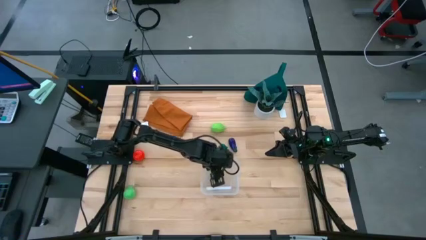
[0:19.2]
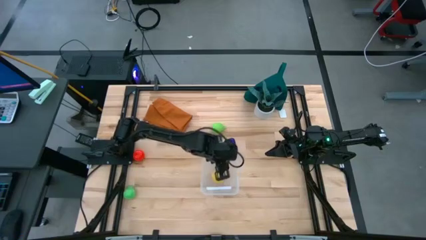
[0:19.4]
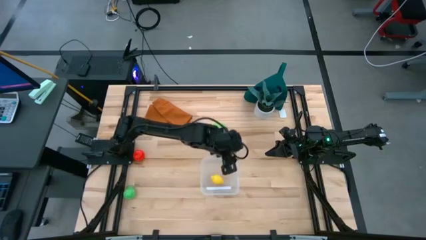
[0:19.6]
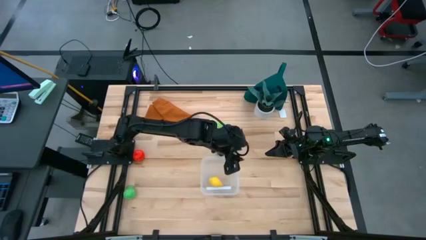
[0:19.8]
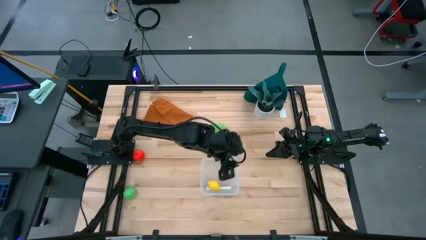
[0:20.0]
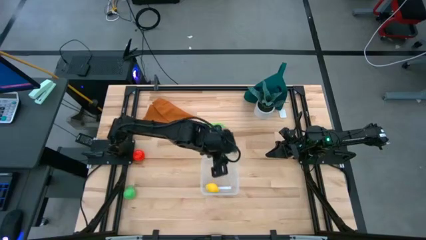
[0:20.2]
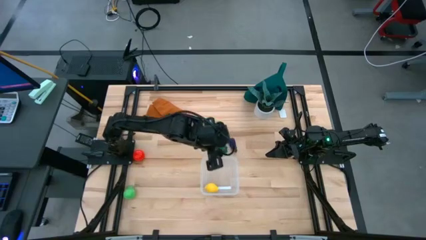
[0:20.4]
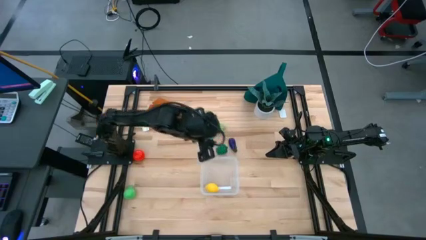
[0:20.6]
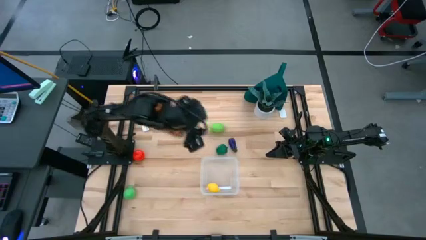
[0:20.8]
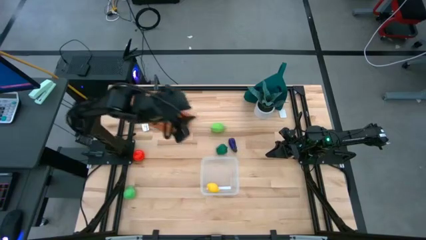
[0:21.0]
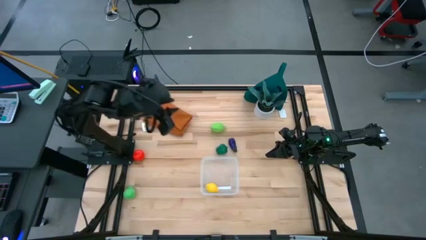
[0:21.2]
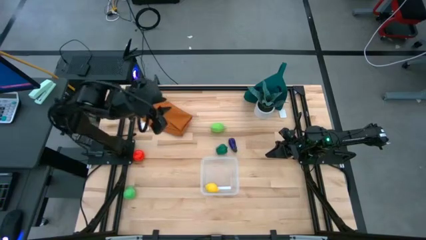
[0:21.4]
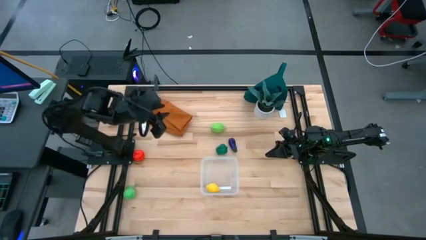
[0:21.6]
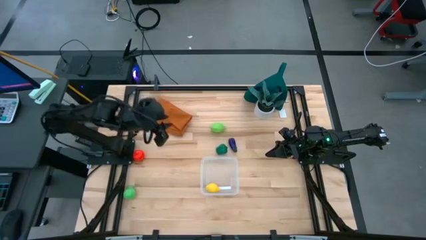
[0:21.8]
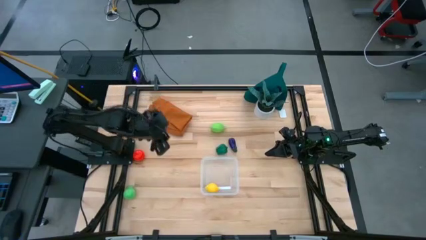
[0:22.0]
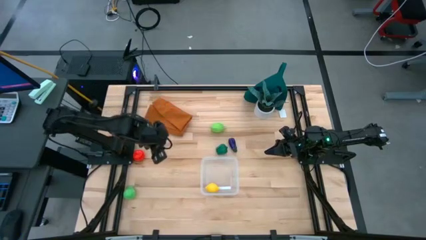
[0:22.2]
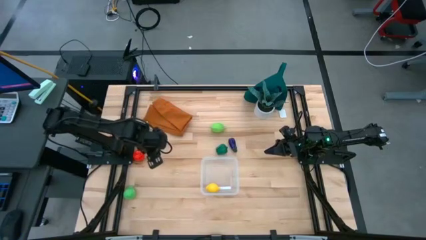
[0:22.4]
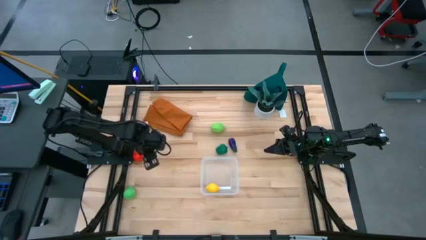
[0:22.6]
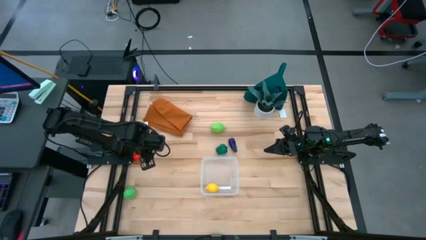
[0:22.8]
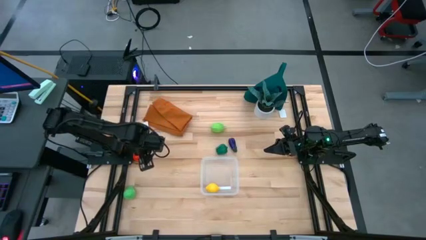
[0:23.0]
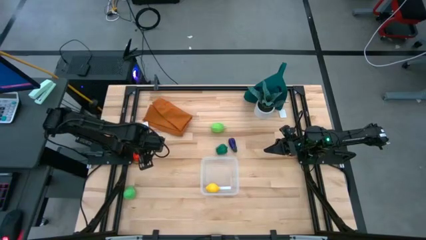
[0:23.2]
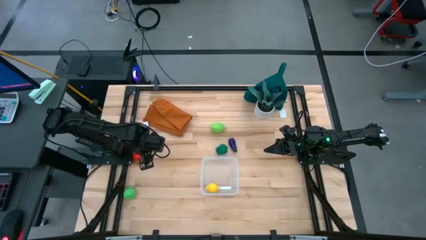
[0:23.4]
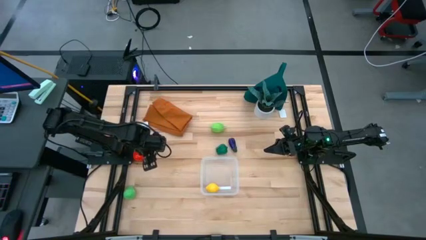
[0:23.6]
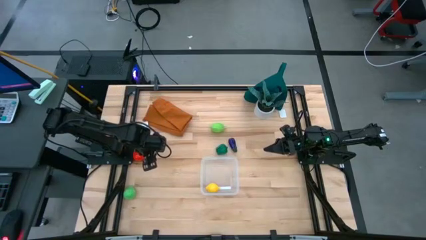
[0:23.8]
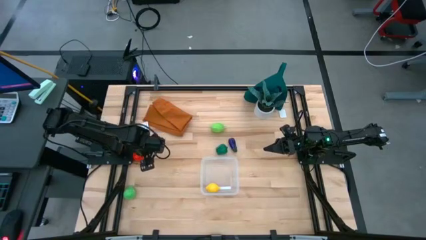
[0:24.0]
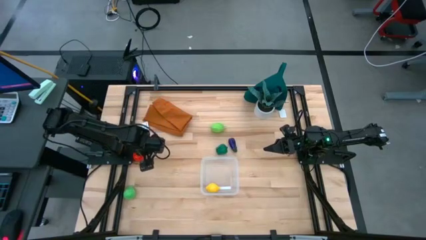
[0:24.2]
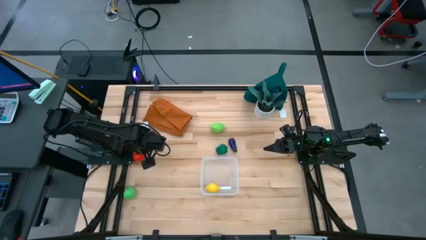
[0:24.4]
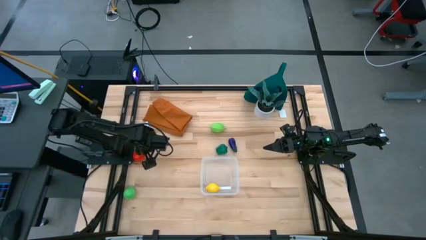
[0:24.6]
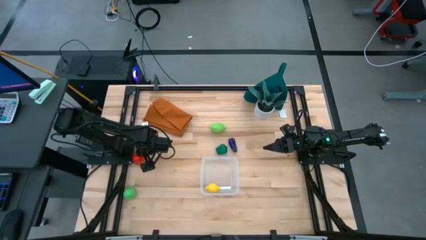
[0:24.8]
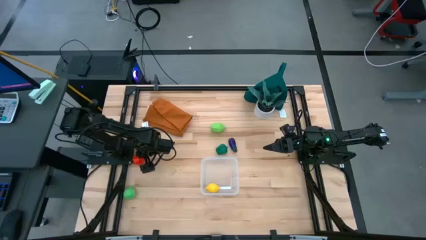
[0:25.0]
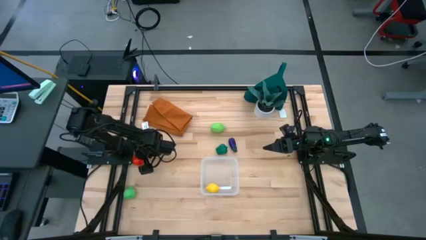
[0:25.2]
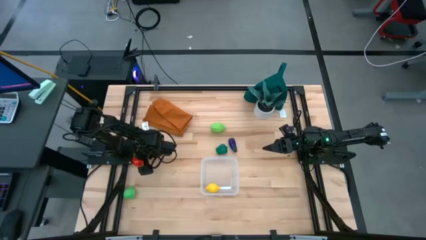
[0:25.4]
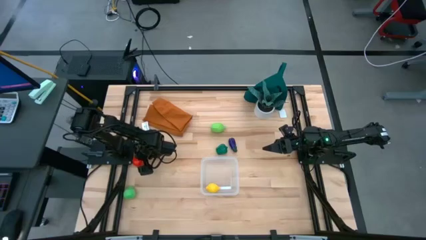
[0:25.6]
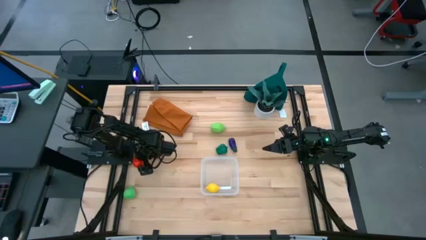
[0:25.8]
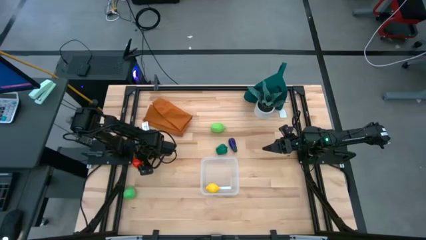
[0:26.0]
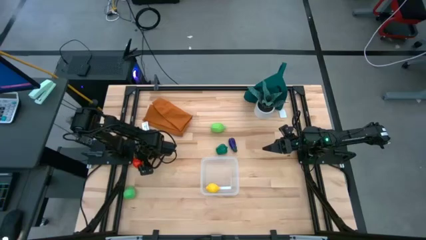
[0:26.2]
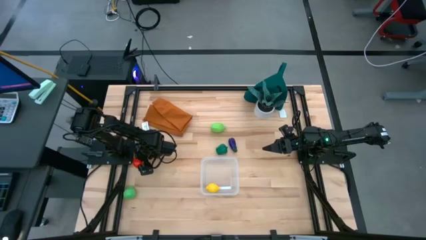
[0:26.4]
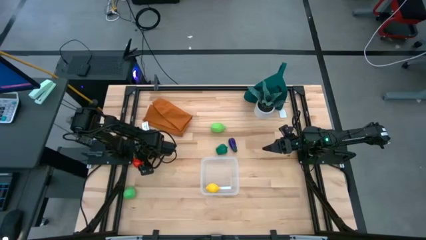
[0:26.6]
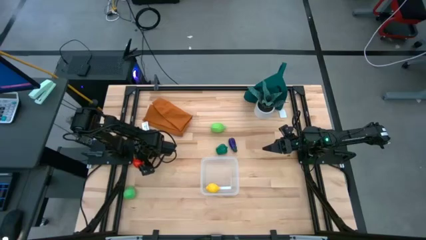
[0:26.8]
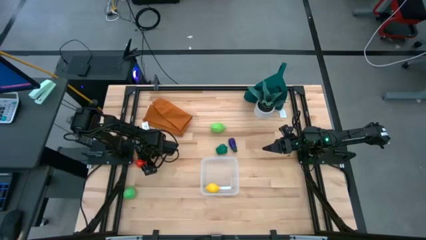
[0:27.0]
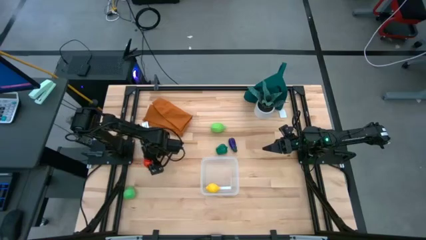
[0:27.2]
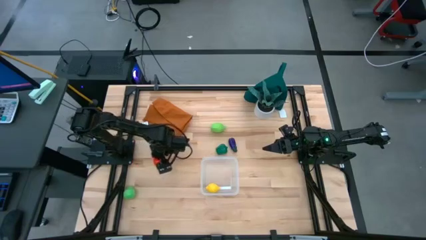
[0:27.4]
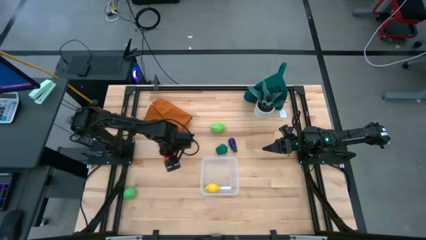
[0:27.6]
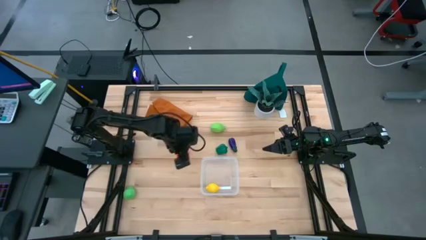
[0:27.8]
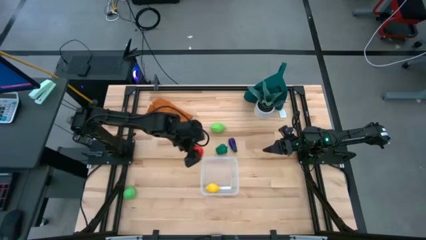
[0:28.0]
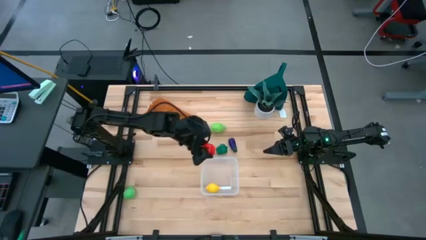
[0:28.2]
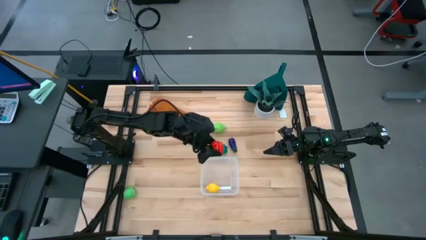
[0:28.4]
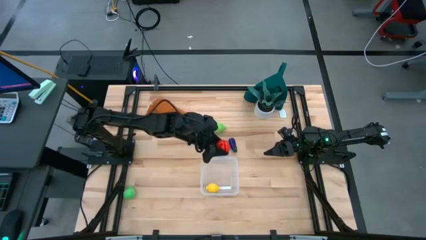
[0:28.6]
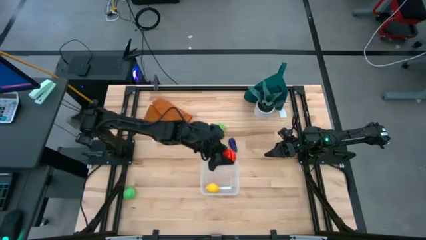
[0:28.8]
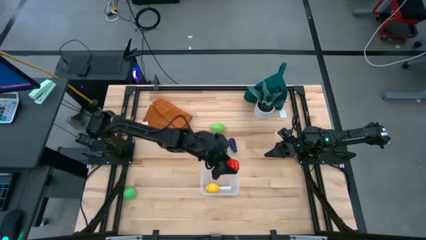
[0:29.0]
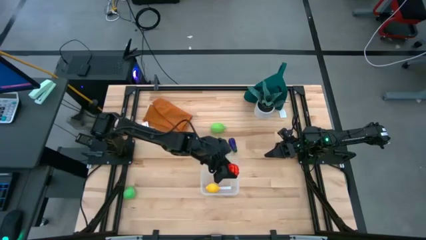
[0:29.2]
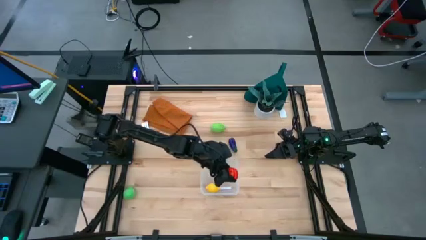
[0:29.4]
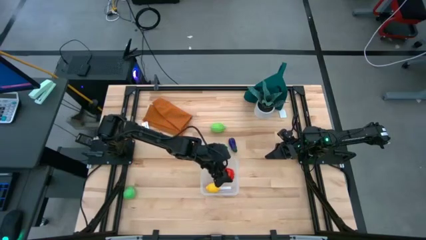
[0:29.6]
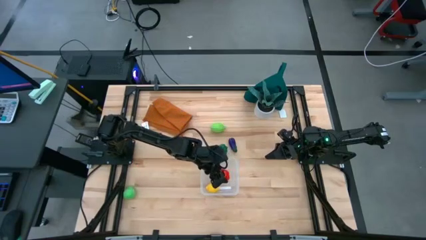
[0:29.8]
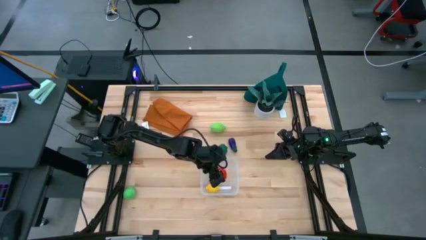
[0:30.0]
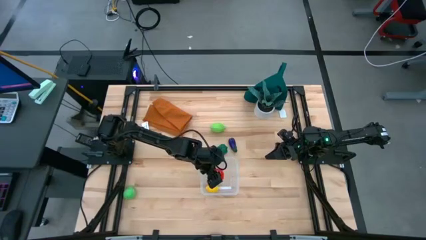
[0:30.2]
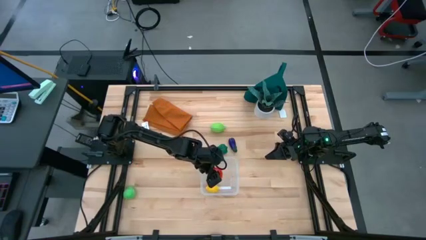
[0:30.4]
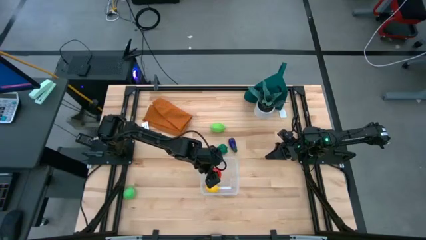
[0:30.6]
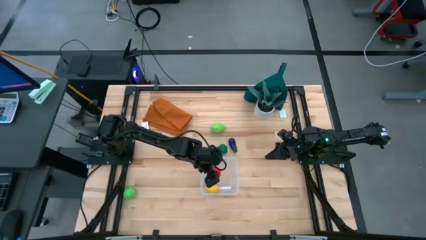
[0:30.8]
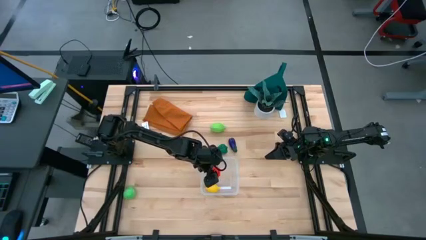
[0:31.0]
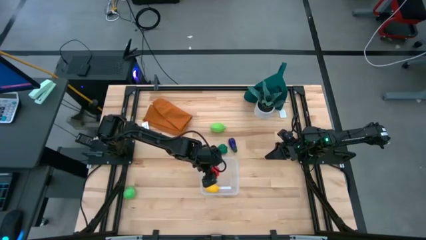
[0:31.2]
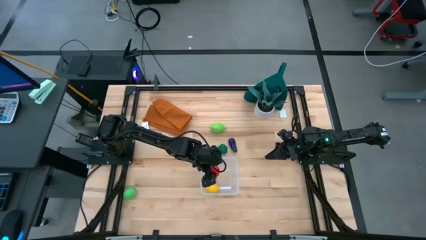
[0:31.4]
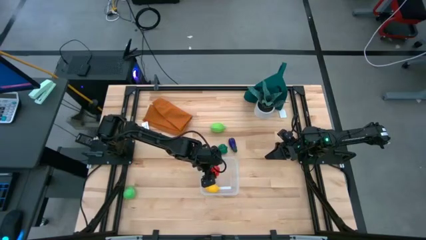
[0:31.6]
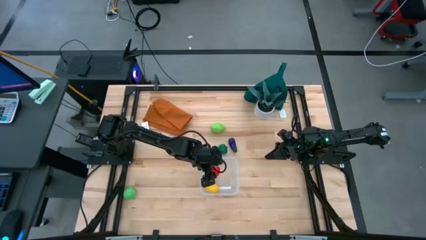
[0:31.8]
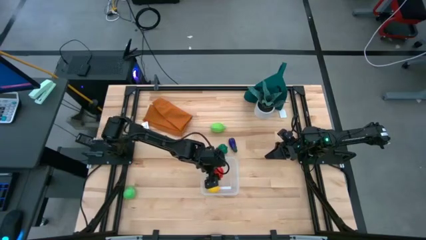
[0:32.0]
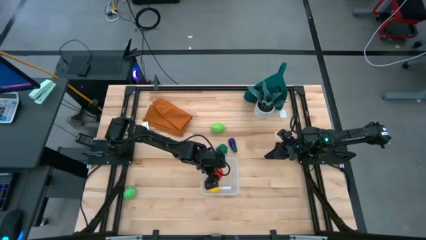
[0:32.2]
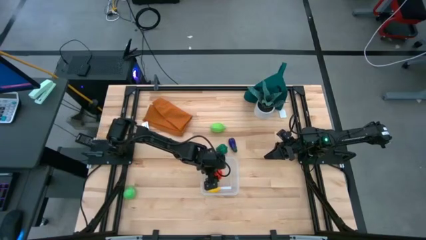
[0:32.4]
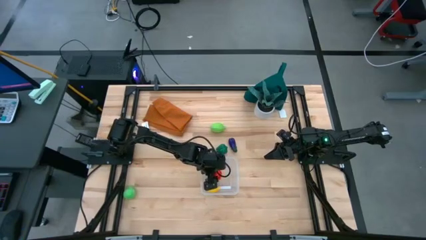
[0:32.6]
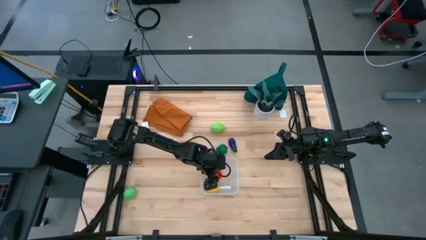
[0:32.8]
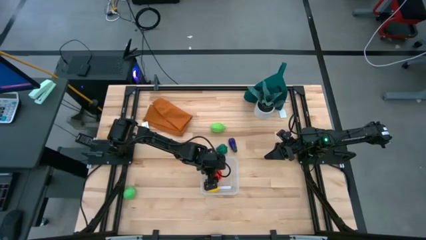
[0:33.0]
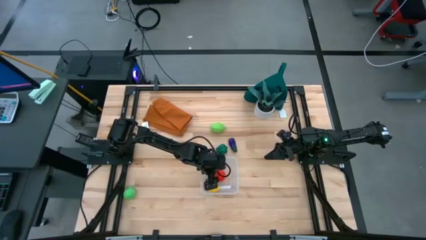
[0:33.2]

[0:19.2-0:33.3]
Task: Pick and placing Produce into tupperware
Put the tomato into the transparent bin
